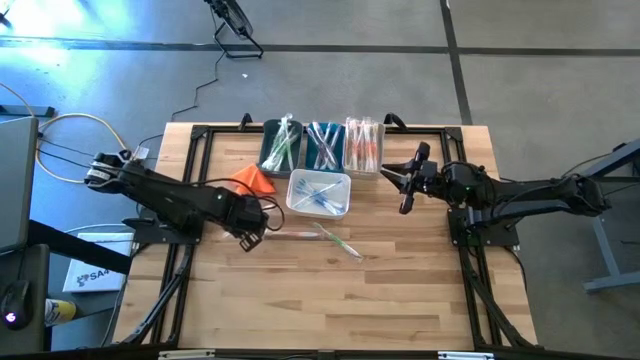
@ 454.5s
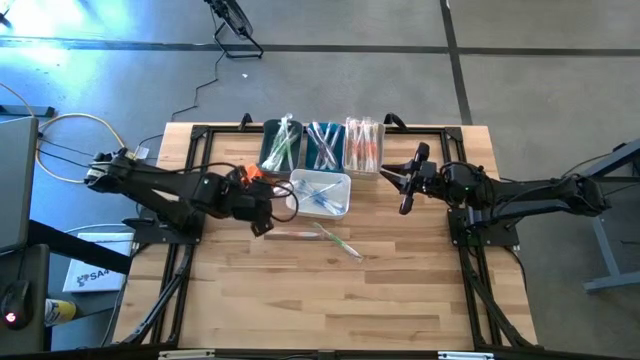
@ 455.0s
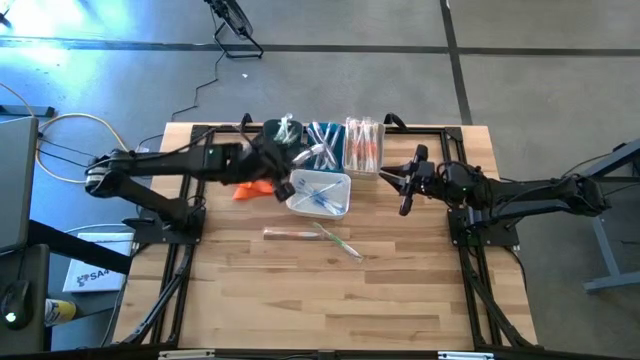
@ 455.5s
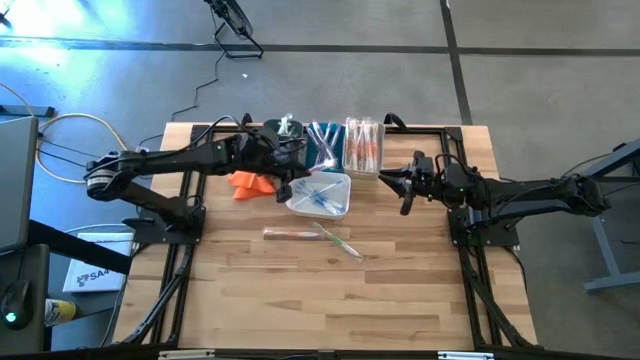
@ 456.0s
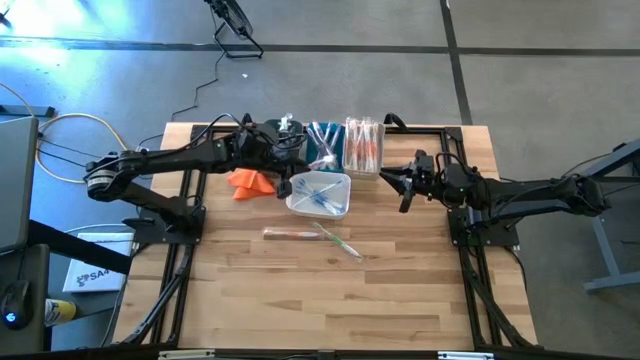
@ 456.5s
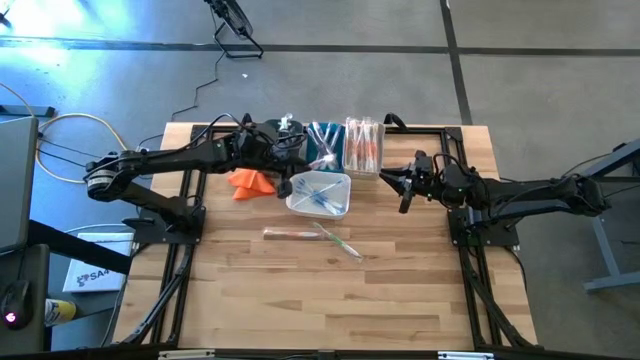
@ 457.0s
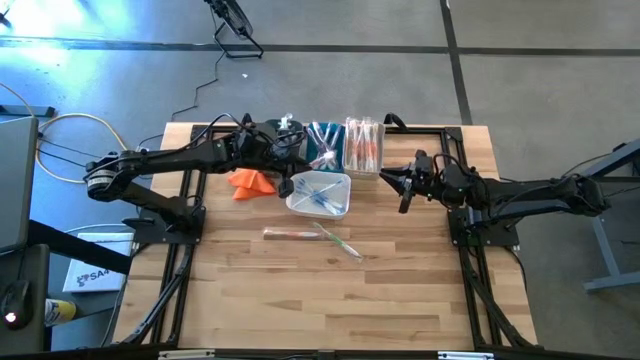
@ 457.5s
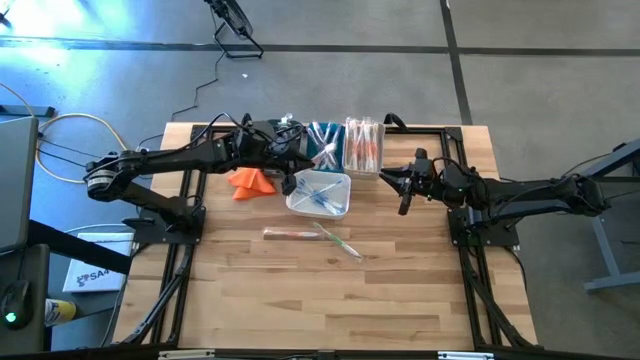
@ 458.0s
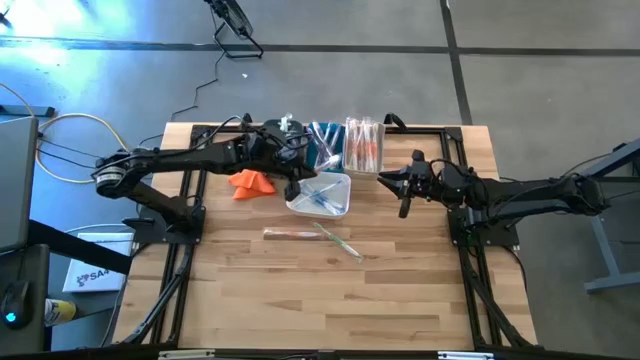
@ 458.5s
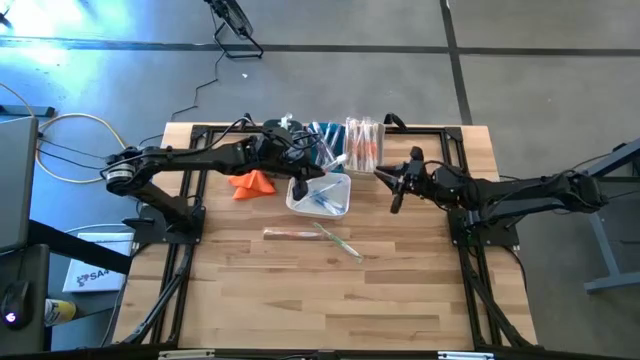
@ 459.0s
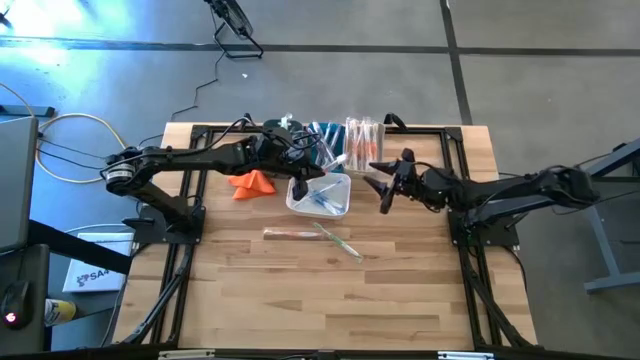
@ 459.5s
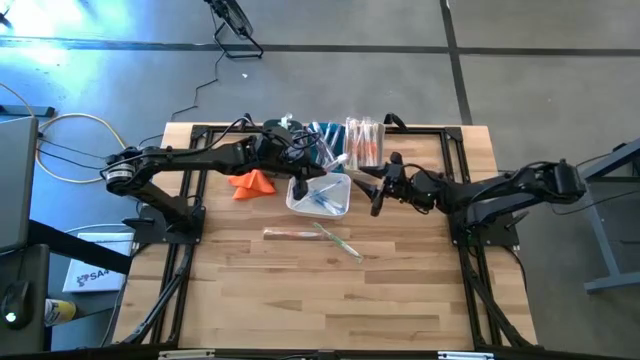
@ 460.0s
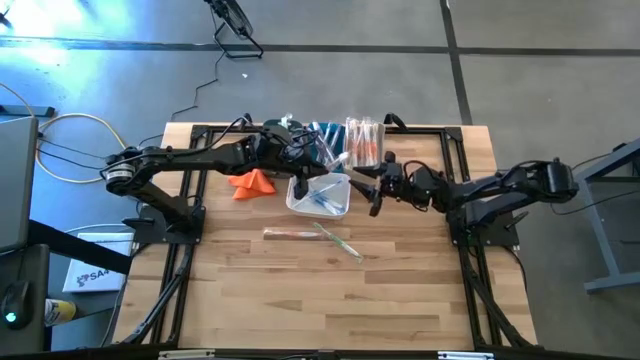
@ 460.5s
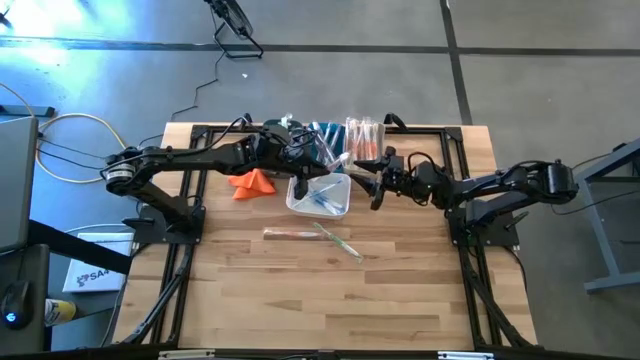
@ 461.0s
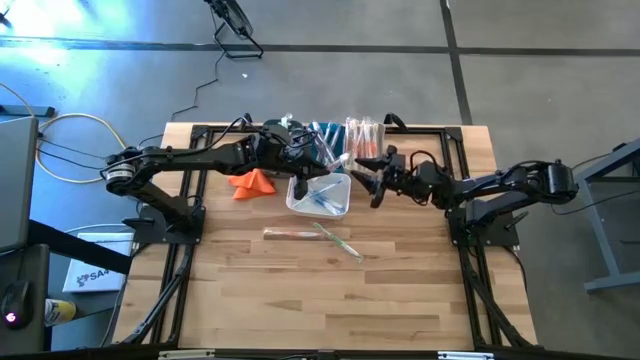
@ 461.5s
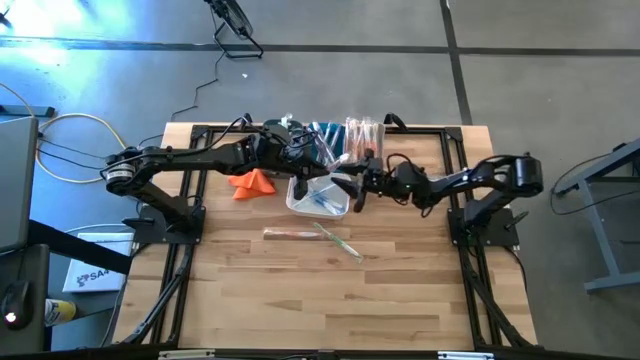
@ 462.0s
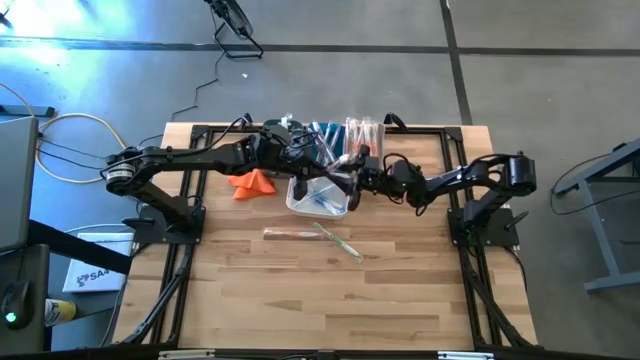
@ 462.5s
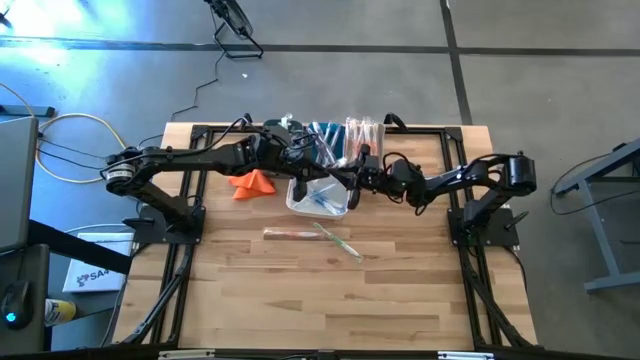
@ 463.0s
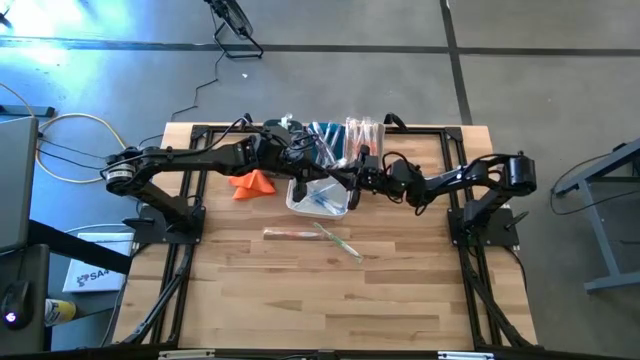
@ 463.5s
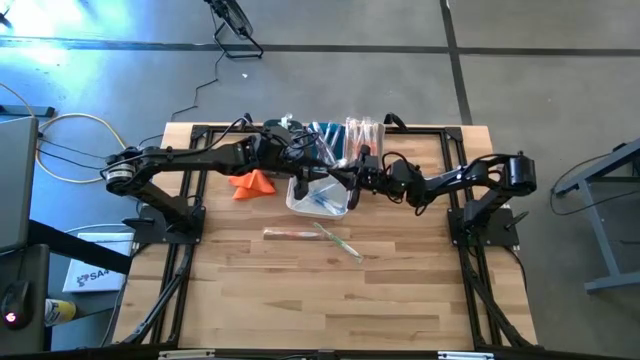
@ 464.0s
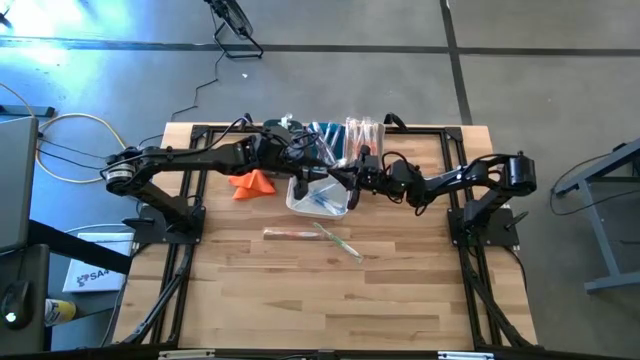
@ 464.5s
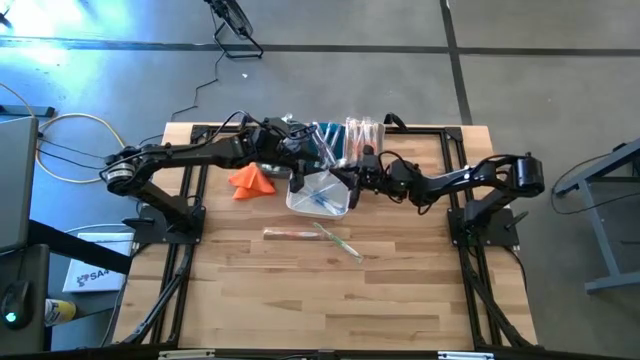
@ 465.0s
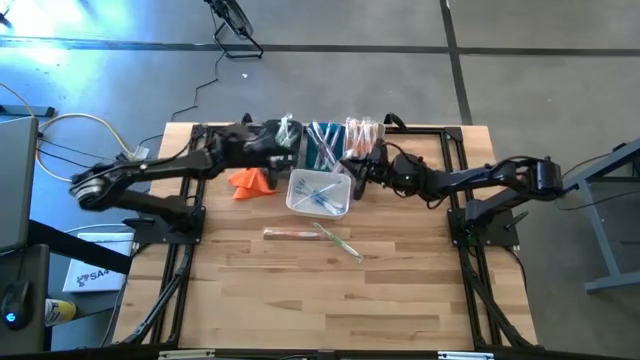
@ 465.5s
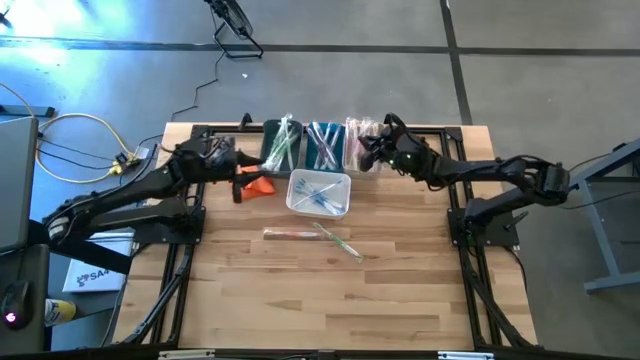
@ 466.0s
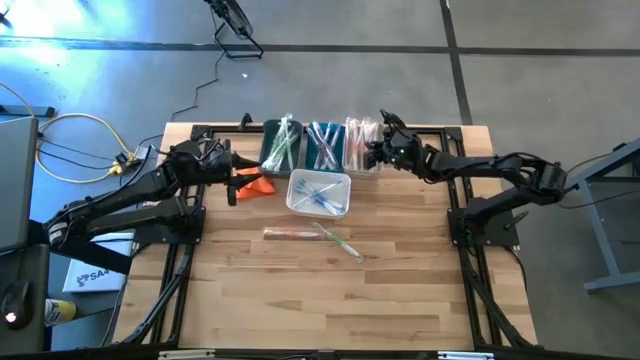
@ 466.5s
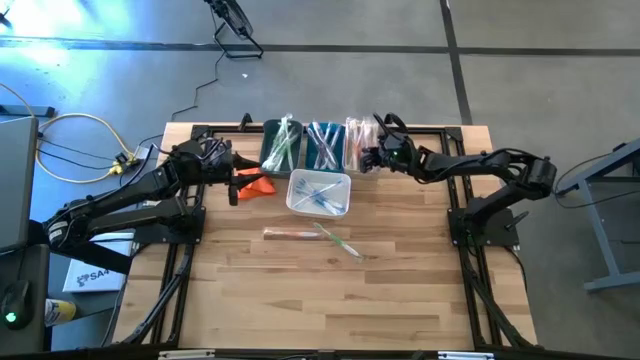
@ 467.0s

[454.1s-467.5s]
Task: Pick & Place Toothbrushes
Put the orange toothbrush into the gray bin

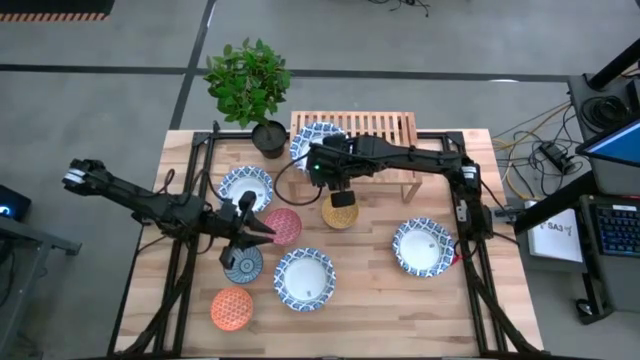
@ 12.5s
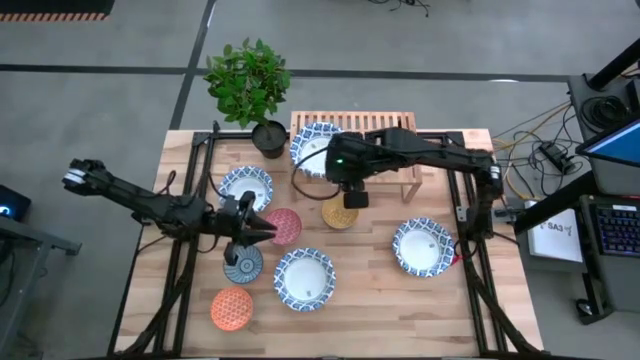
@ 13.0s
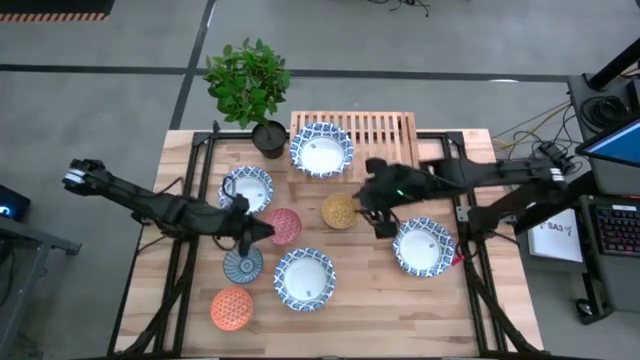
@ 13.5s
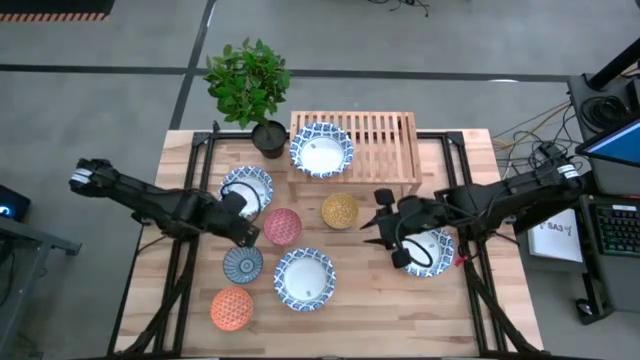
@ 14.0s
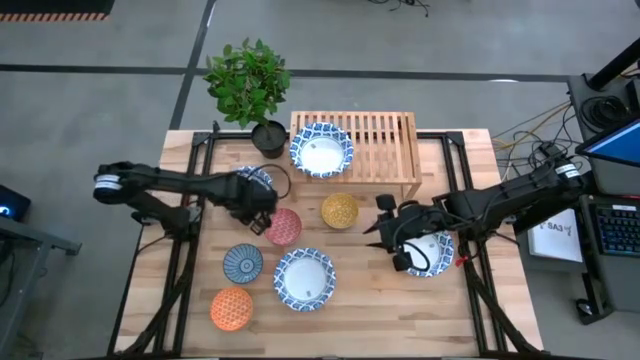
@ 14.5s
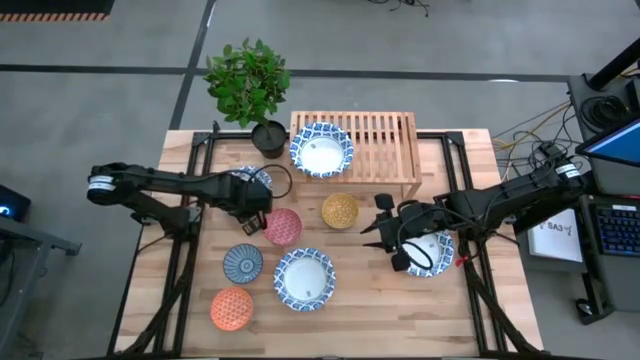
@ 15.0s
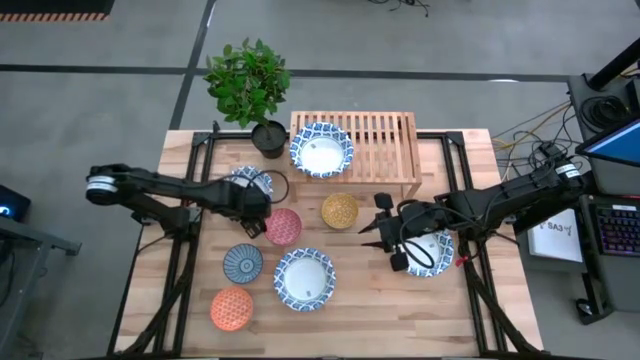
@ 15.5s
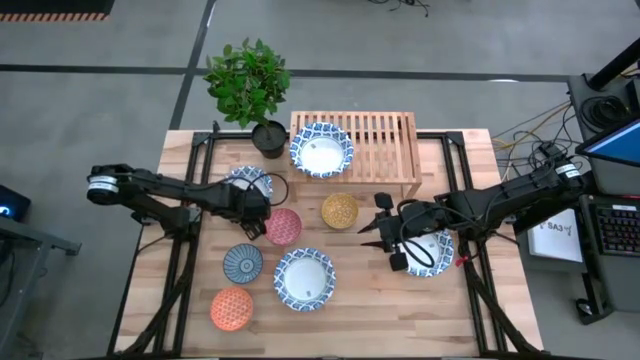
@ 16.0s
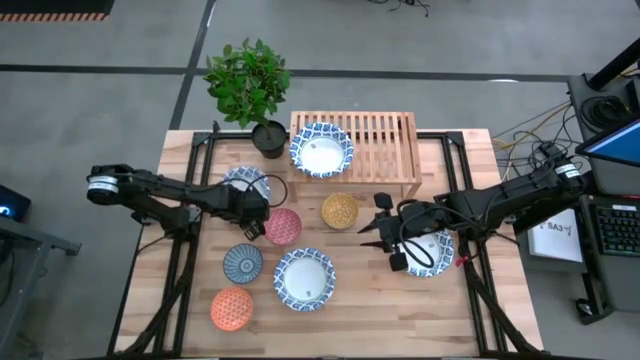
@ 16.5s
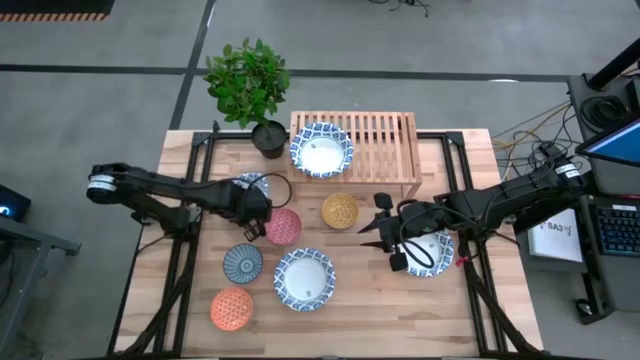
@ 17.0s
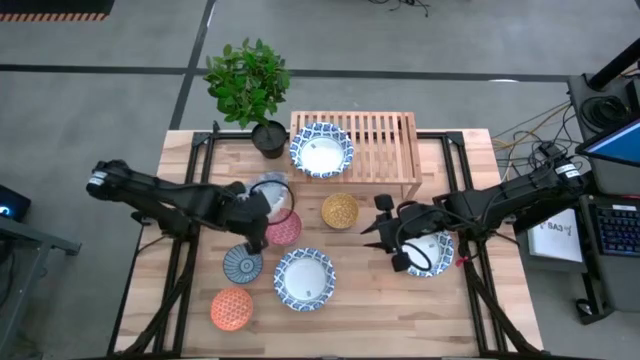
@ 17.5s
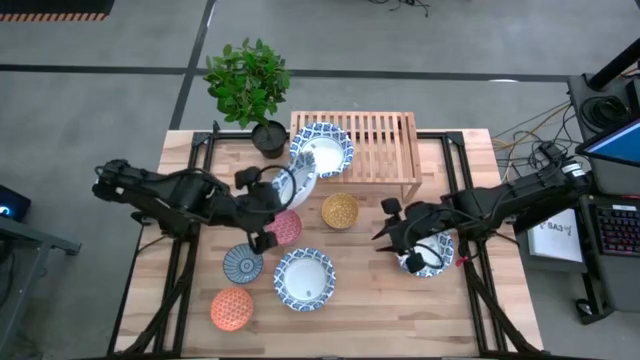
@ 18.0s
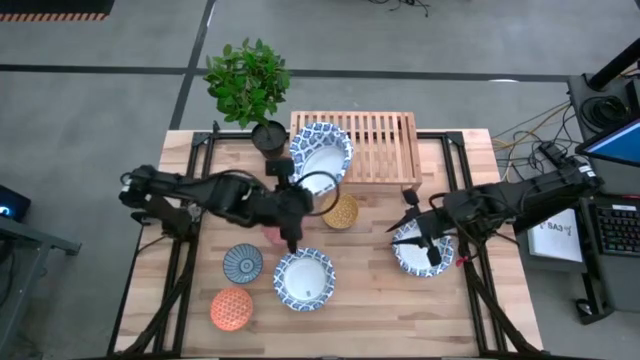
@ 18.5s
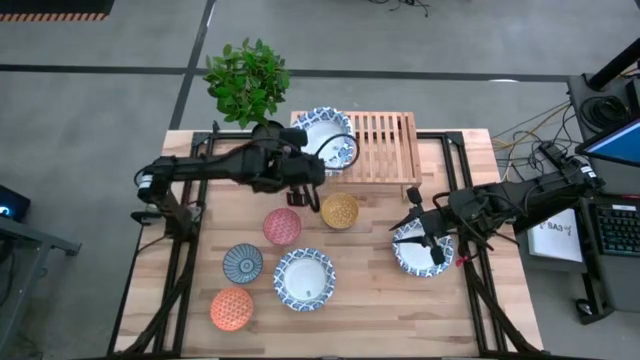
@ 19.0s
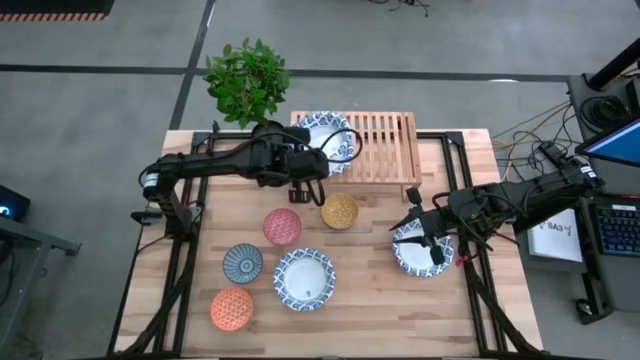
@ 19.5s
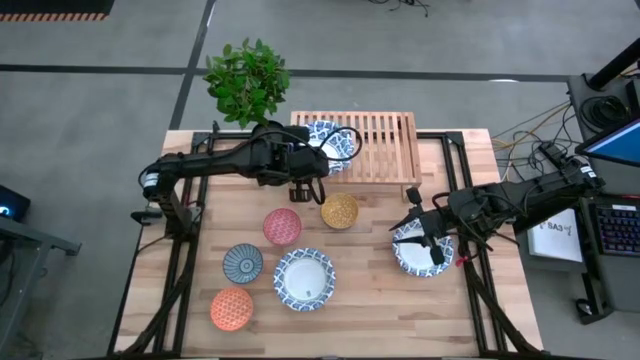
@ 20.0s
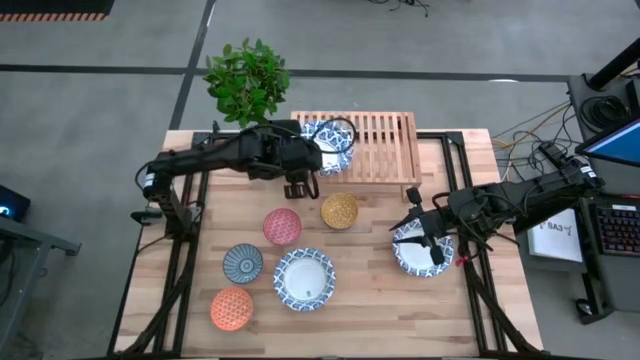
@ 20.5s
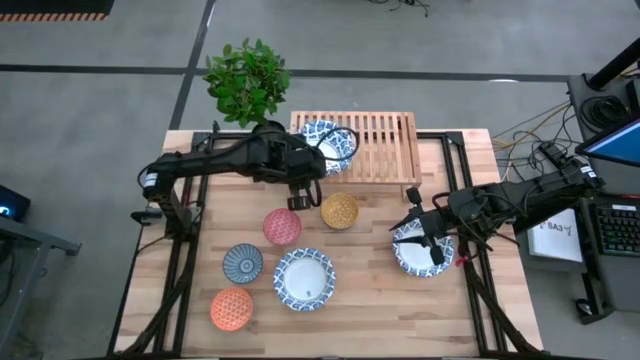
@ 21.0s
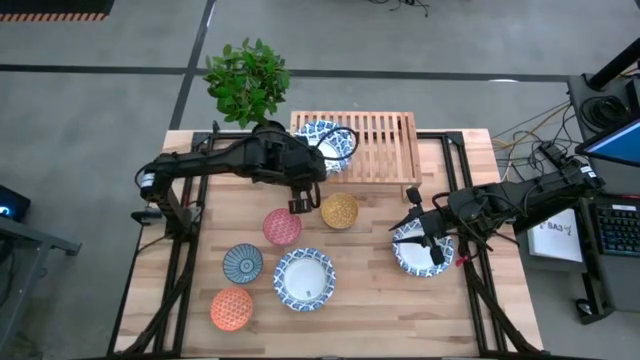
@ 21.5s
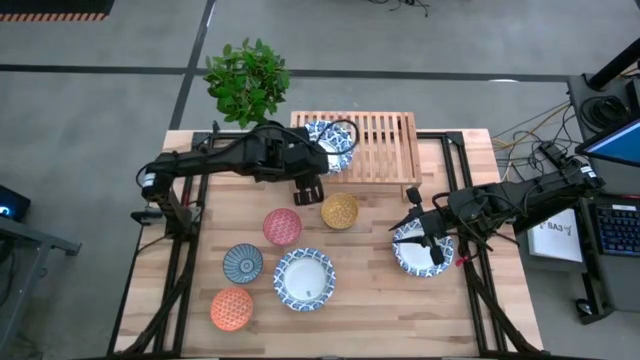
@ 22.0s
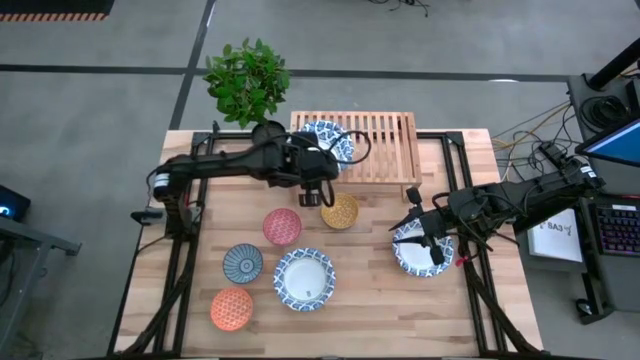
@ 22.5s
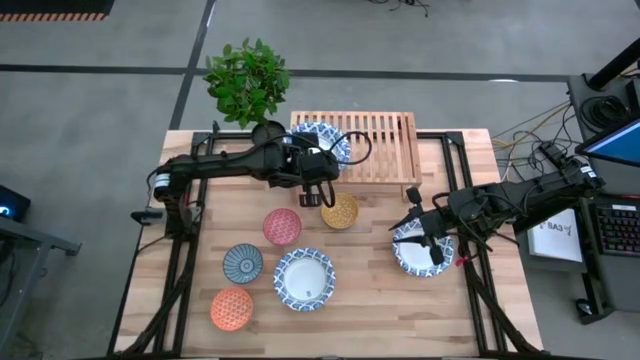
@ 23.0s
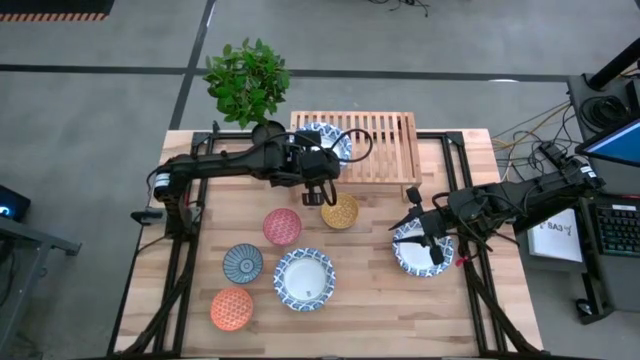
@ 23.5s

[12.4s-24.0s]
Task: Place and stack bowls onto a shelf
Stack the top left white blue patterned bowl on top of the other white blue patterned bowl on the shelf
